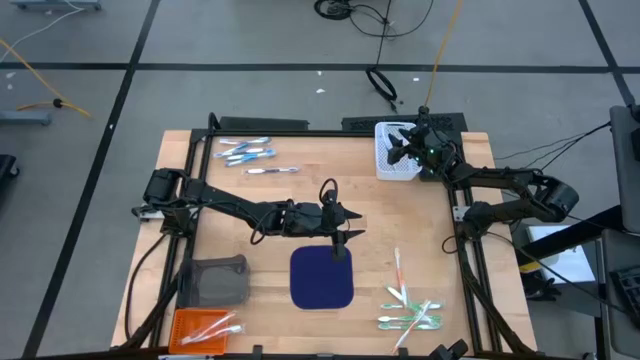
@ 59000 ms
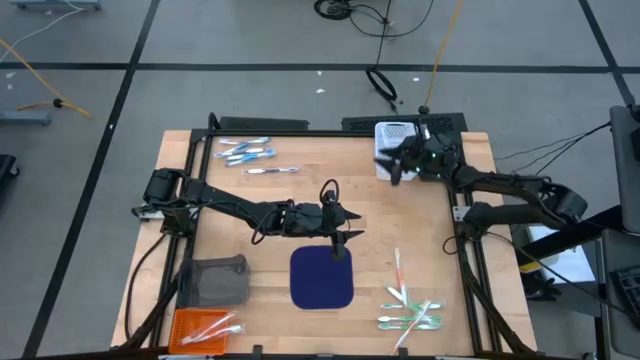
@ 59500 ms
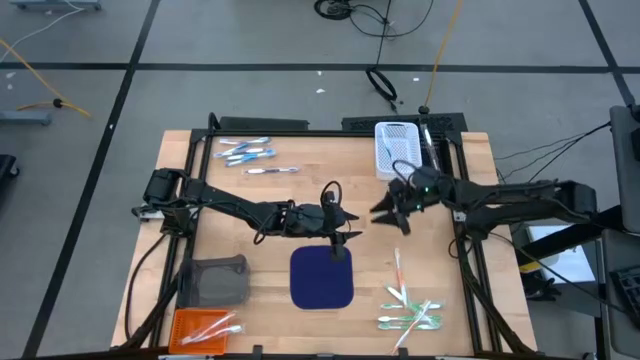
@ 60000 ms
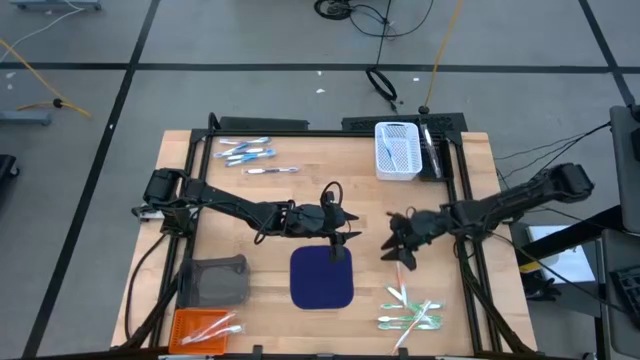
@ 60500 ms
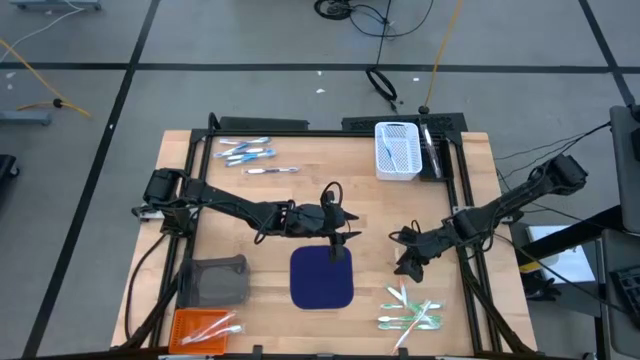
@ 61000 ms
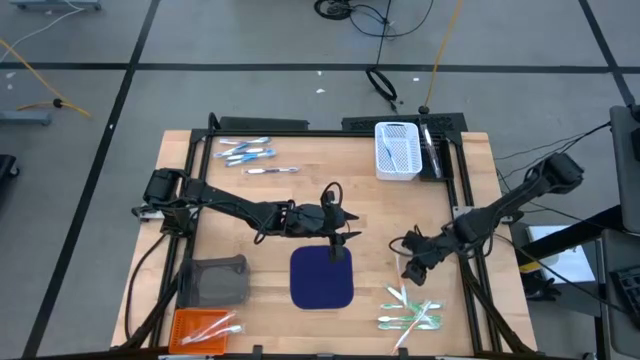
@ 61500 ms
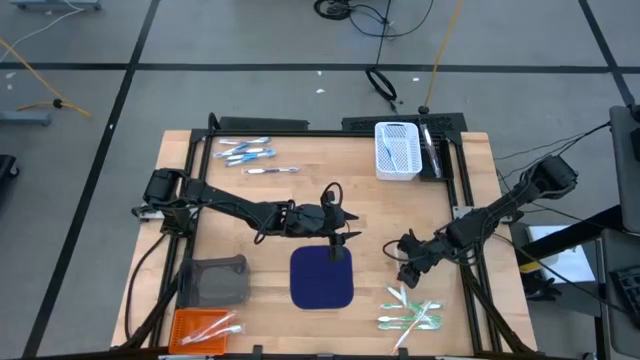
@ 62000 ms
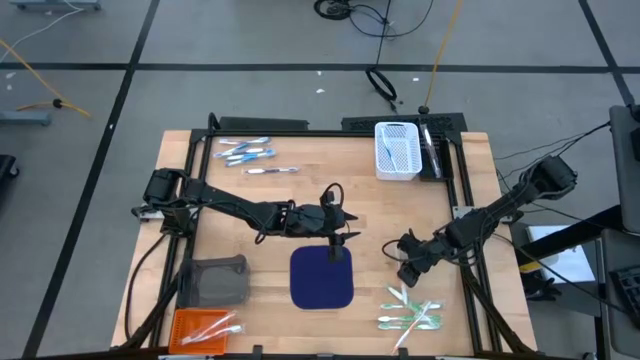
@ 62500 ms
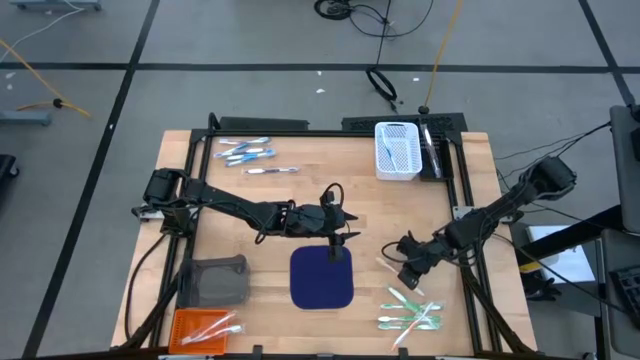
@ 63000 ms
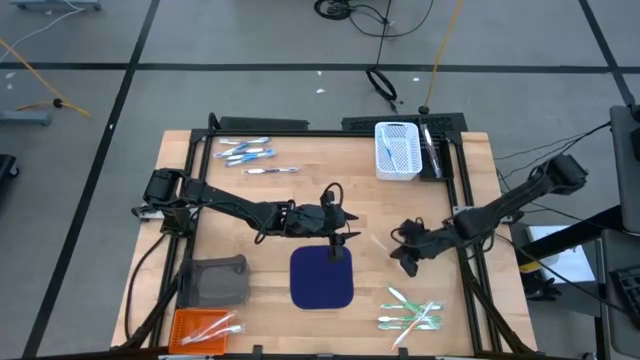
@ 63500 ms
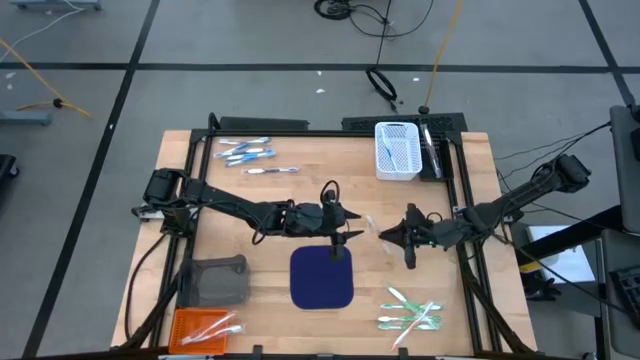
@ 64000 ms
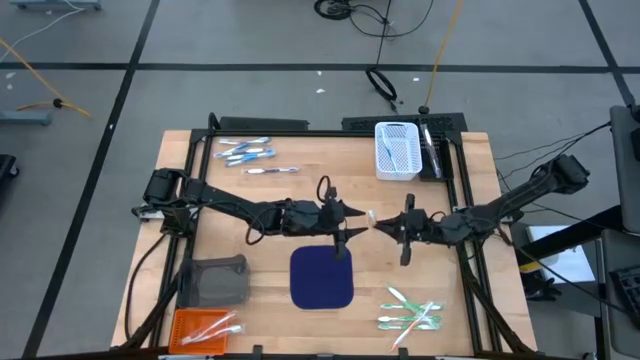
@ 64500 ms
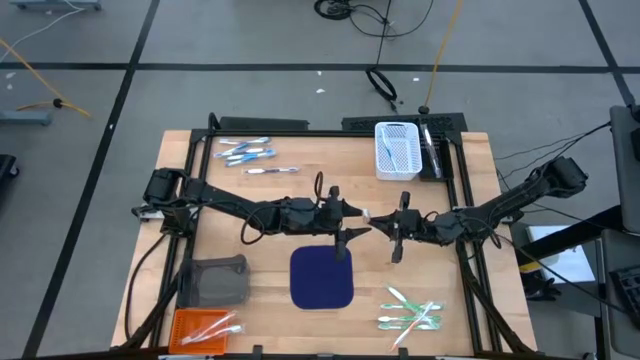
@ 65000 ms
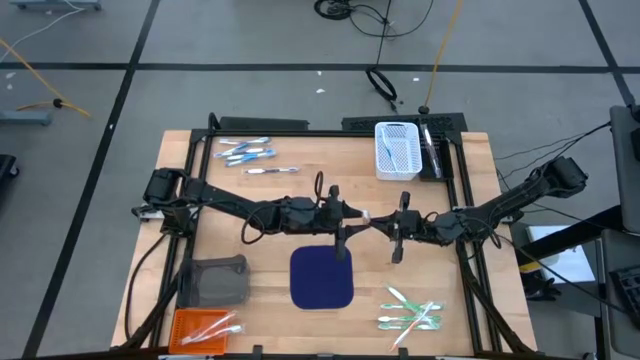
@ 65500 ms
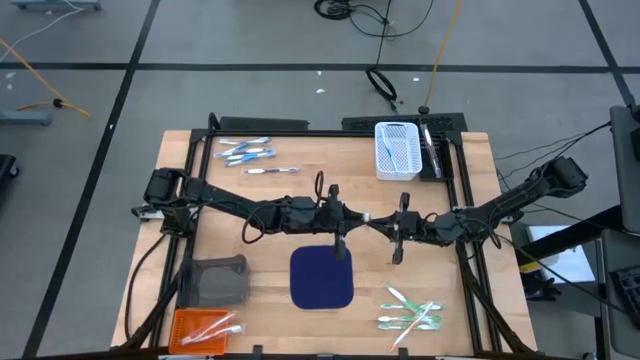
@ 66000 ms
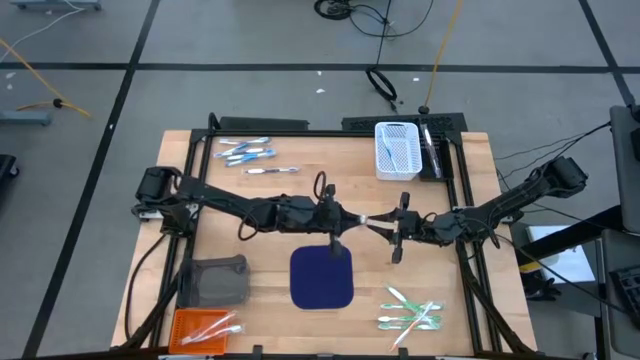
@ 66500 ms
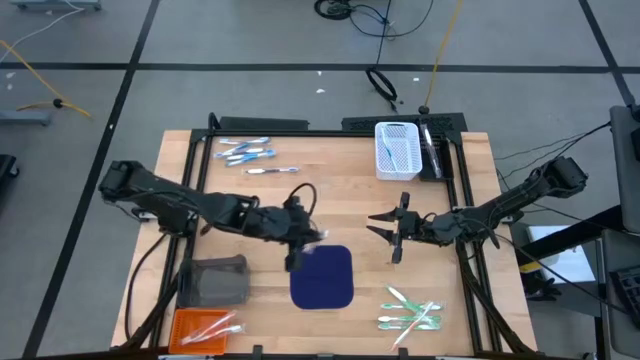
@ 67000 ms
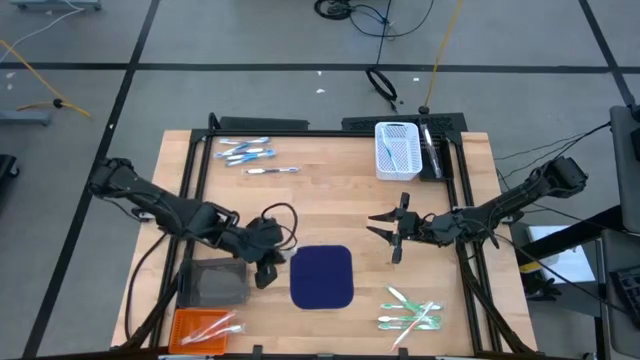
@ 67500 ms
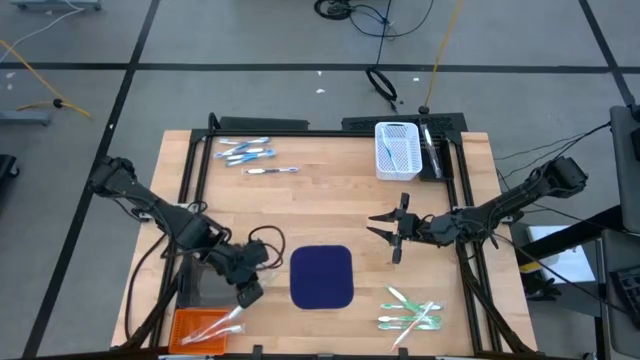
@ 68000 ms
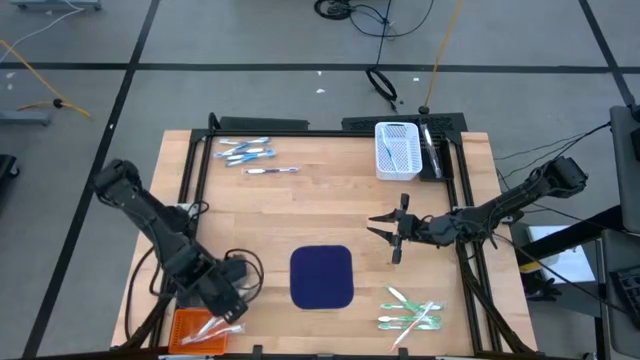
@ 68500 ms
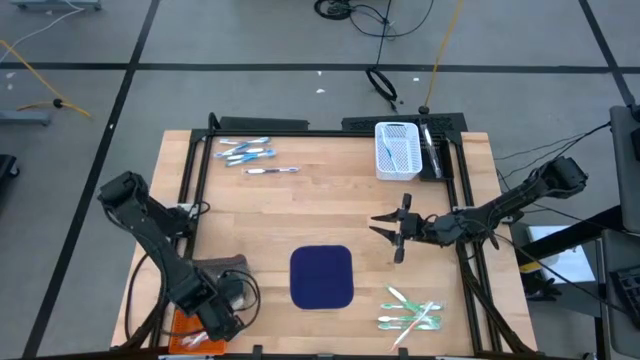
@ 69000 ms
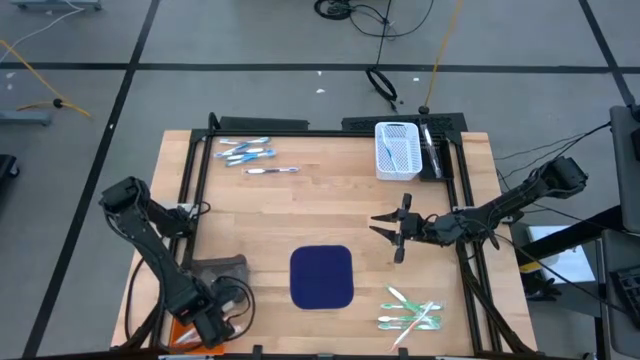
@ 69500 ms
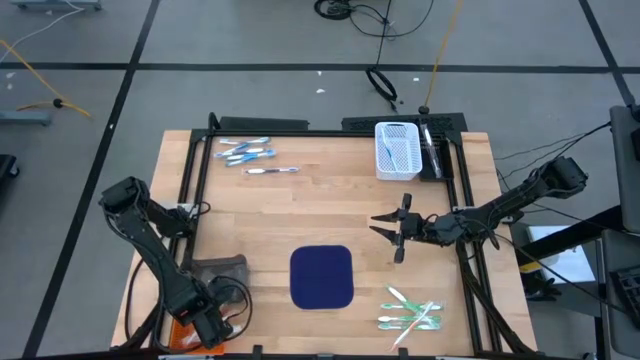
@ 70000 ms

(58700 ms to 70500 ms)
Task: Pick & Place Toothbrushes
Put the orange toothbrush into the orange basket

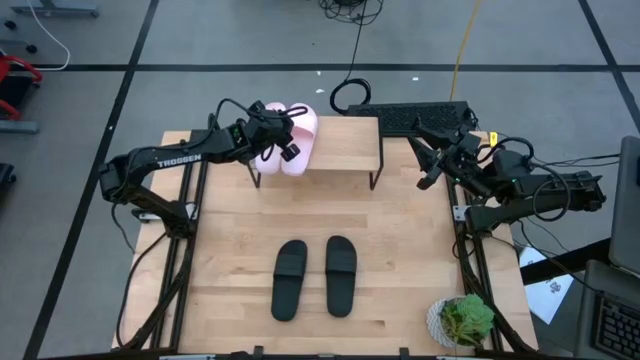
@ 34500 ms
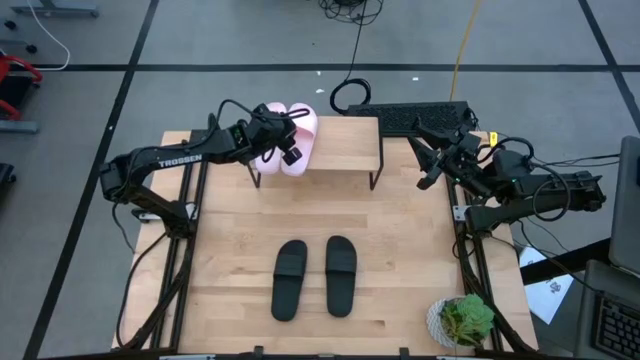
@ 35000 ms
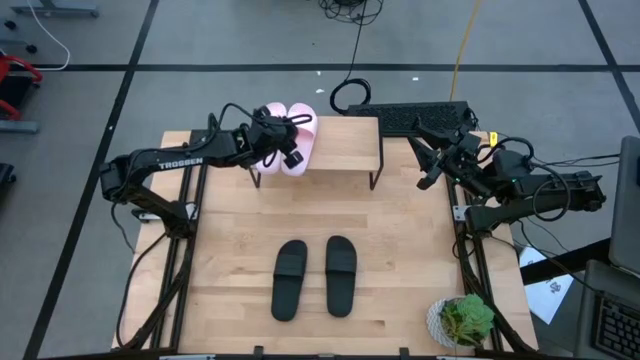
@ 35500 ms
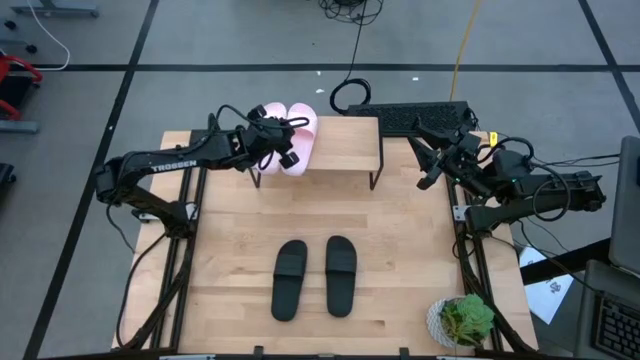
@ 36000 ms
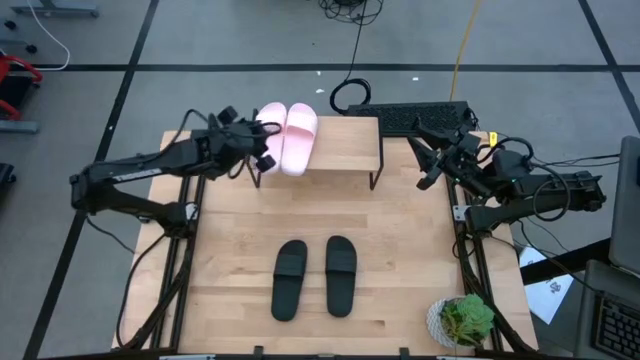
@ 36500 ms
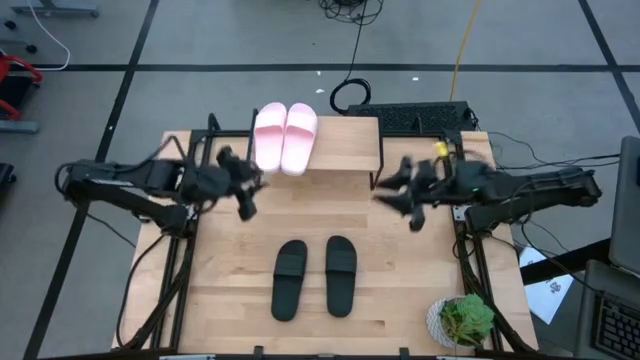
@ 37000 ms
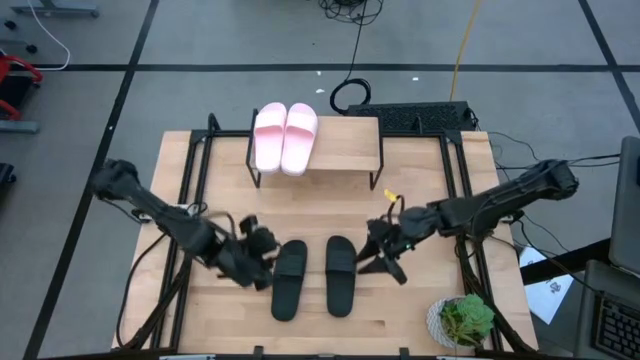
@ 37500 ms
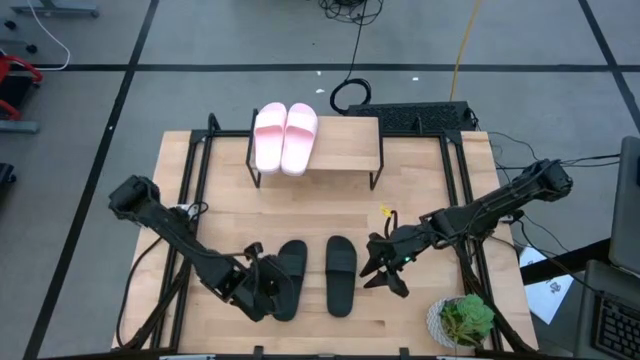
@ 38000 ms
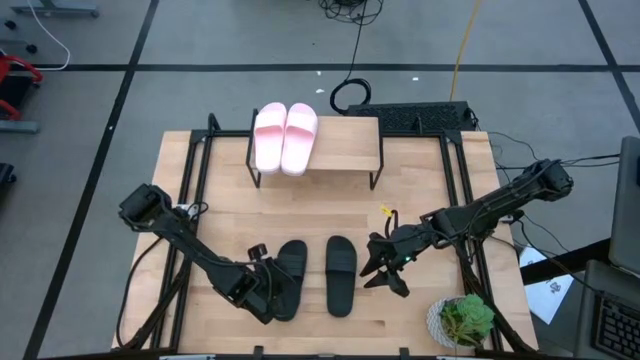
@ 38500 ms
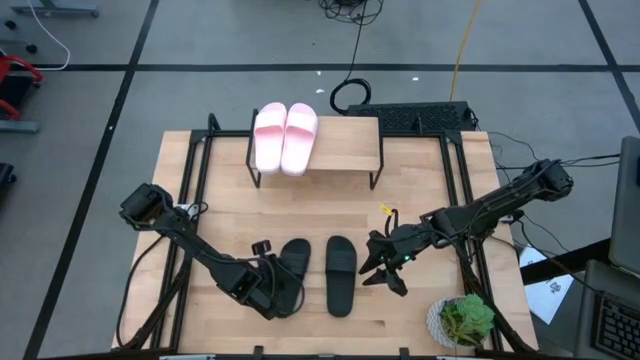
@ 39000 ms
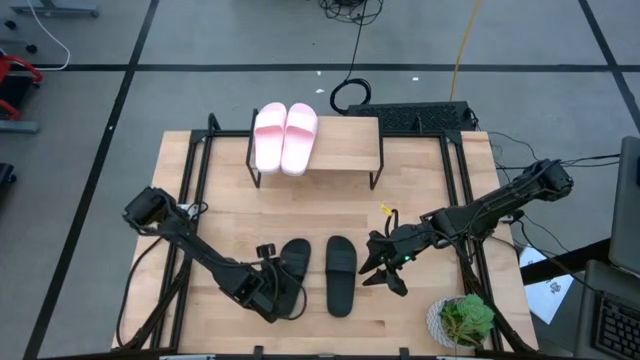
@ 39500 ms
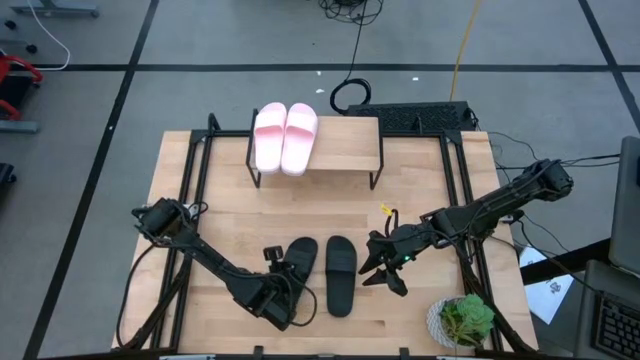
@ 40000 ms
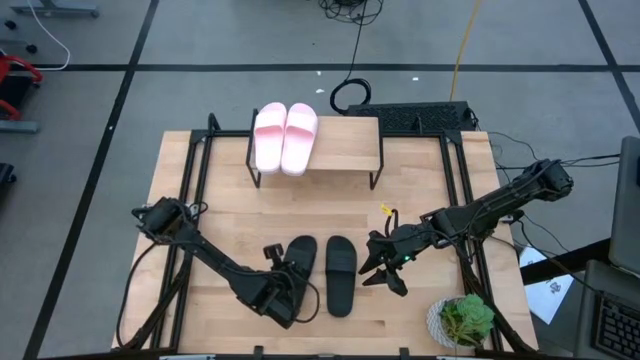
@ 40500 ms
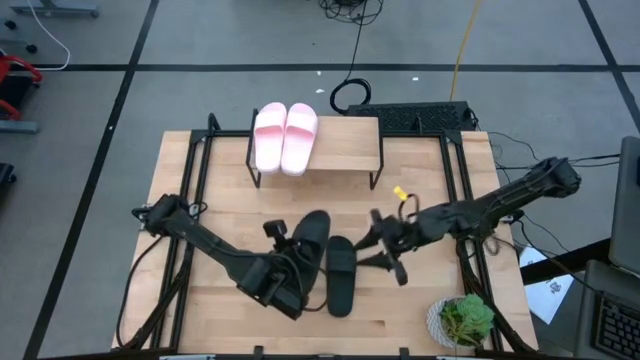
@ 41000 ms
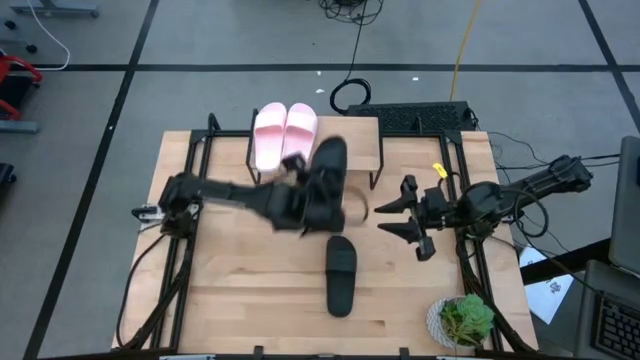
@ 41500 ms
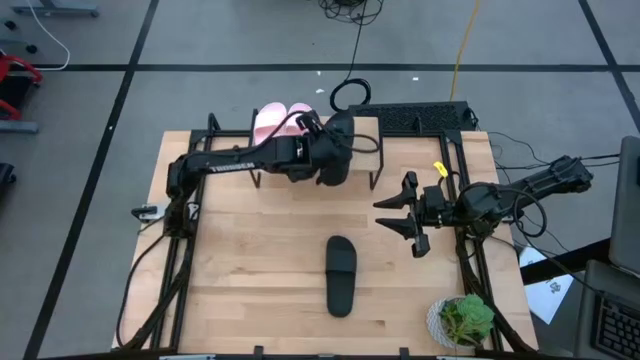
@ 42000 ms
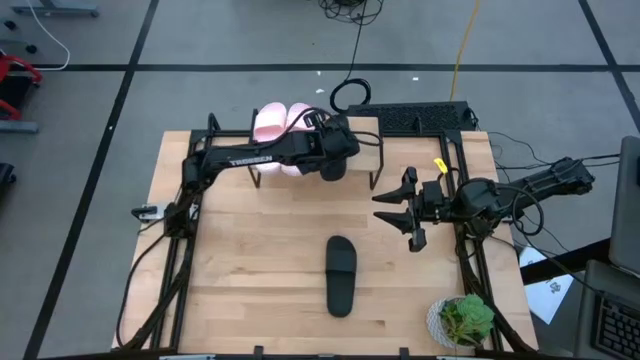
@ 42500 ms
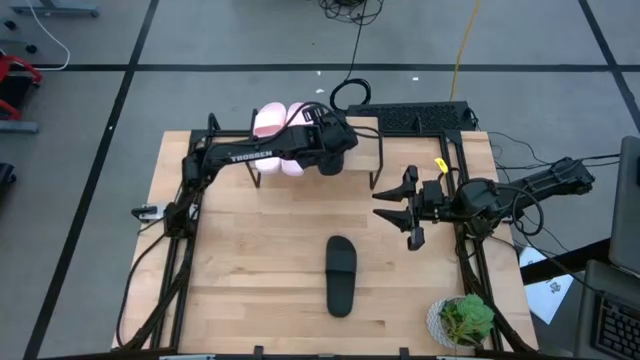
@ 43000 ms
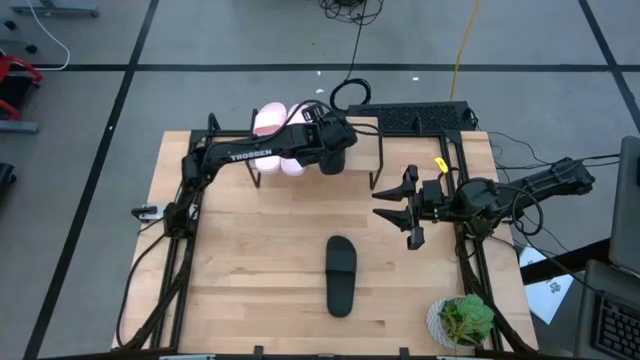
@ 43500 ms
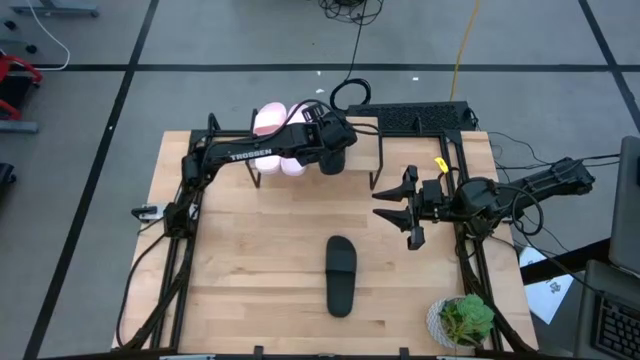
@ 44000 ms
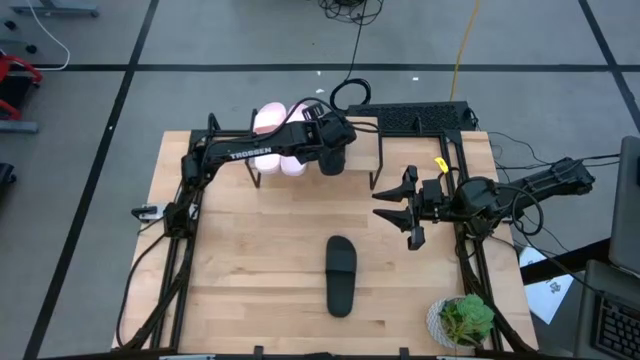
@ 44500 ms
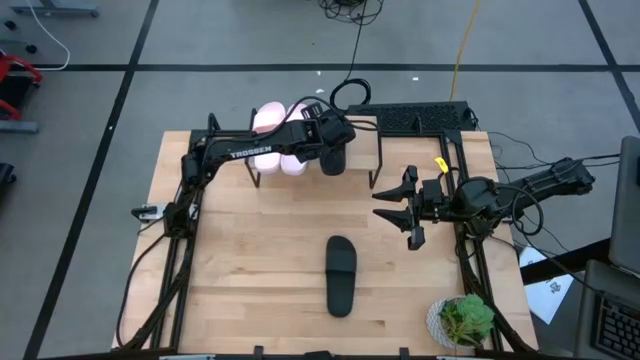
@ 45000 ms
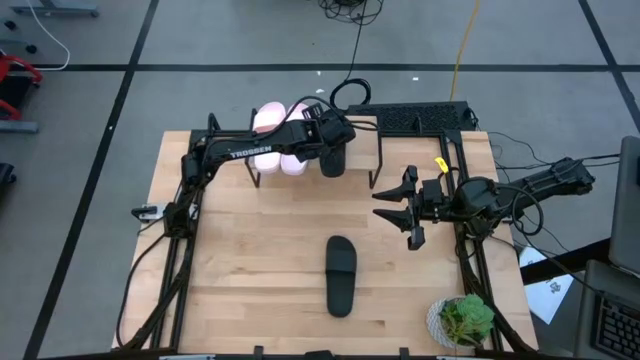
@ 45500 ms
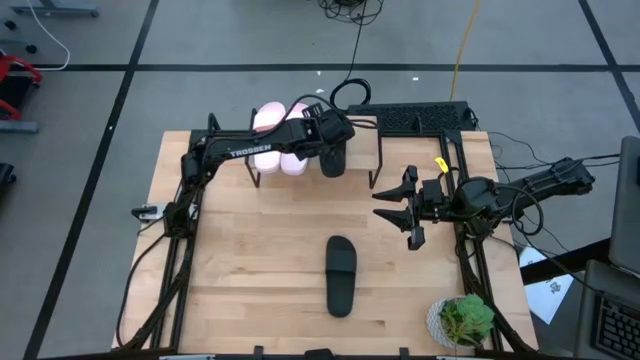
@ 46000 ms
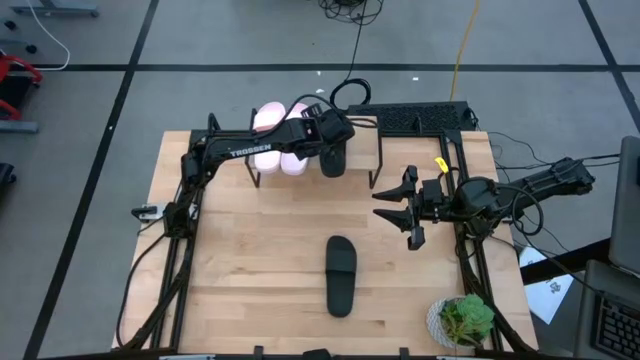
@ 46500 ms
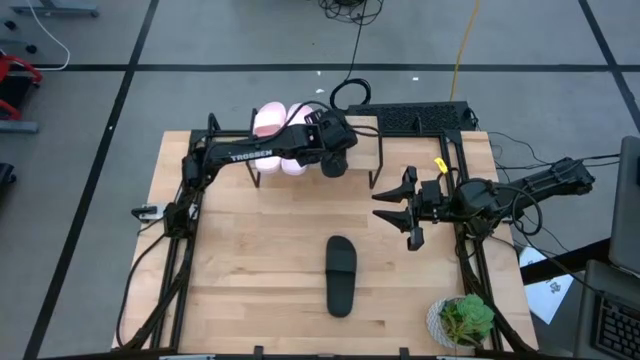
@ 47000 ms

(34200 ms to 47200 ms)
Task: Pick and place slides into the shelf
Put the left black slide on the shelf
